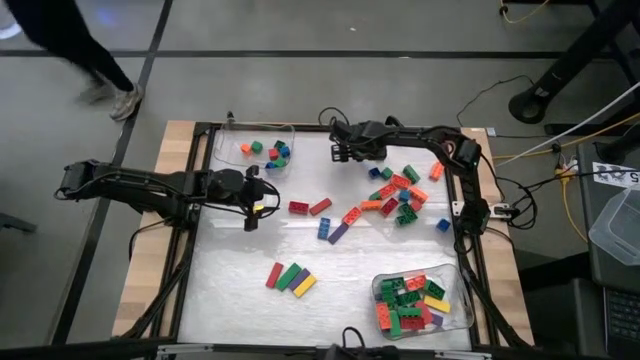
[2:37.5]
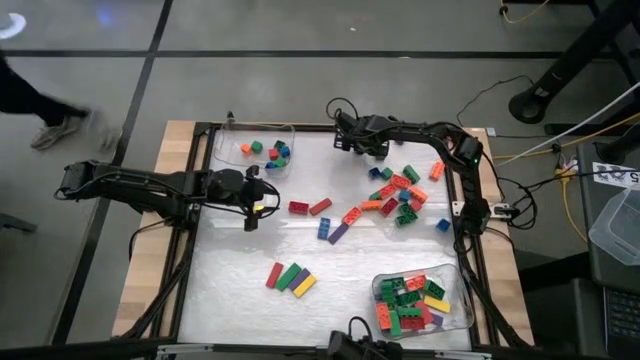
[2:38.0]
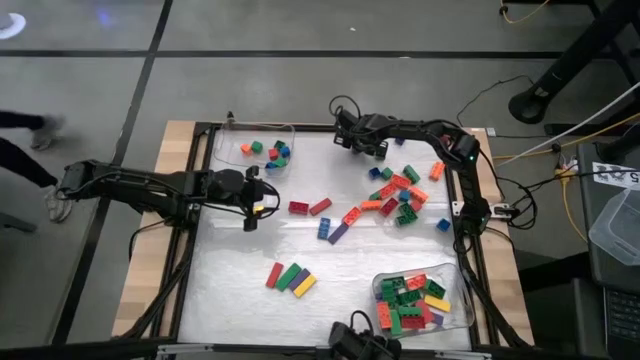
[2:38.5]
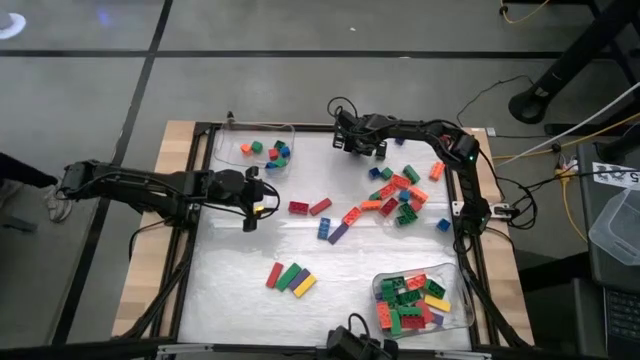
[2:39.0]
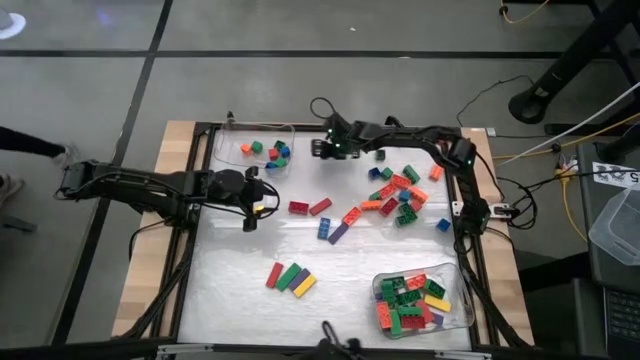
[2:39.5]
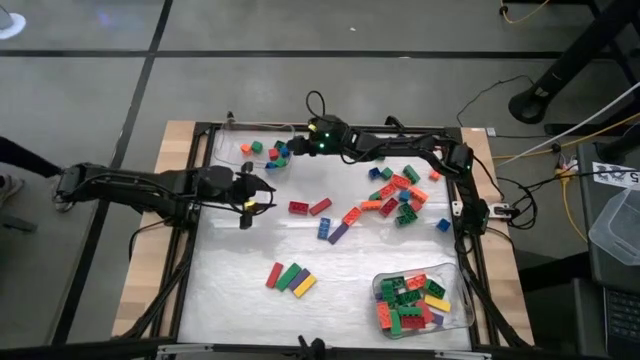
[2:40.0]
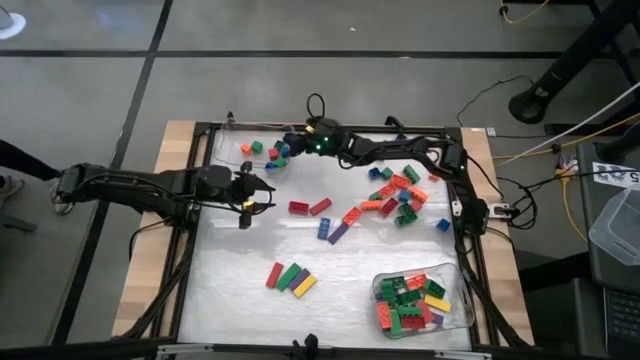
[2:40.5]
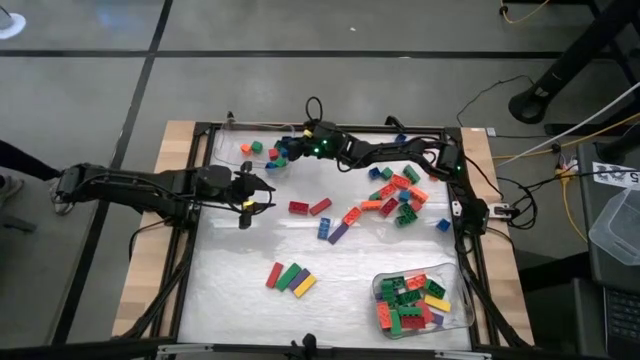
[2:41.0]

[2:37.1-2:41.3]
Task: Sort blocks by size
Put the square blue game piece into the top transparent bin

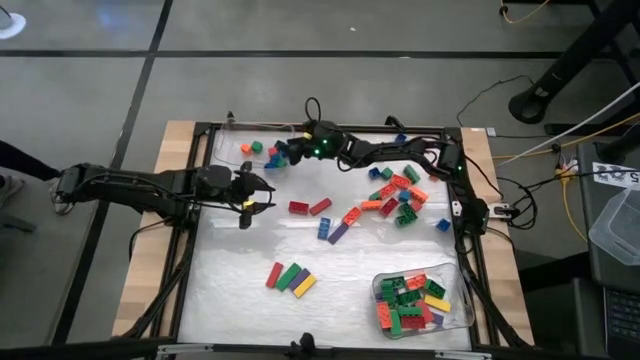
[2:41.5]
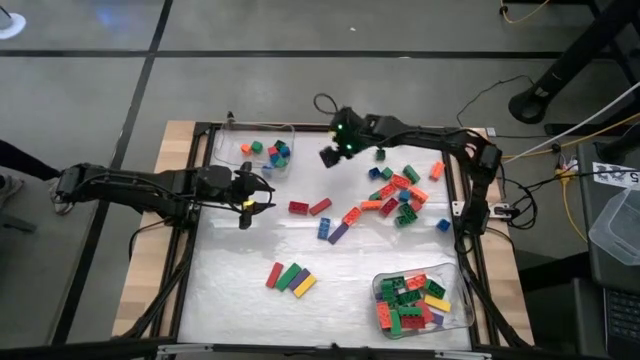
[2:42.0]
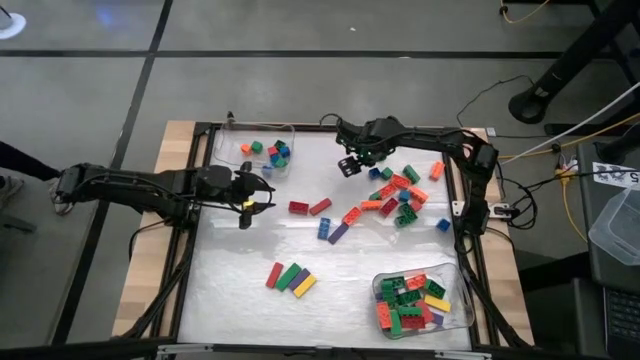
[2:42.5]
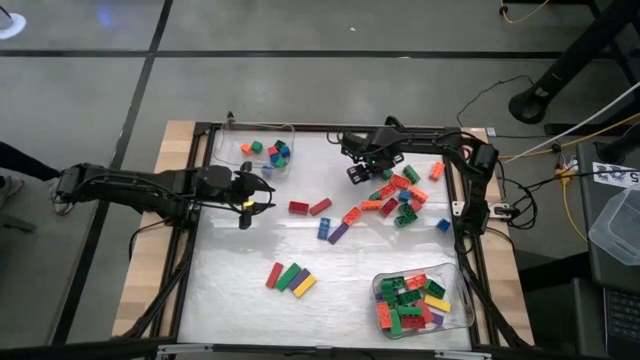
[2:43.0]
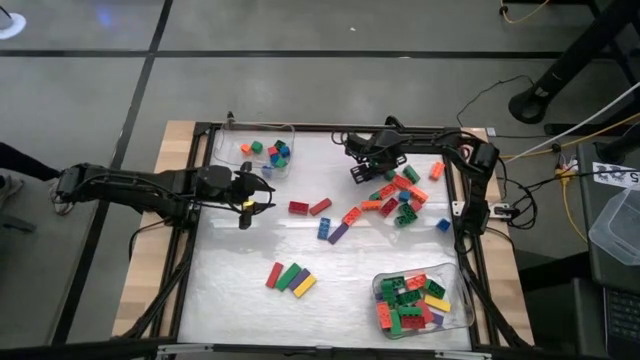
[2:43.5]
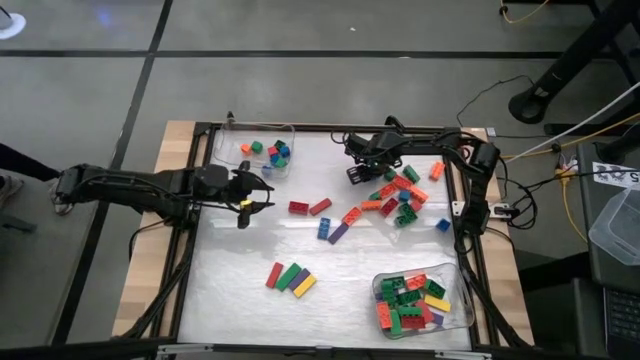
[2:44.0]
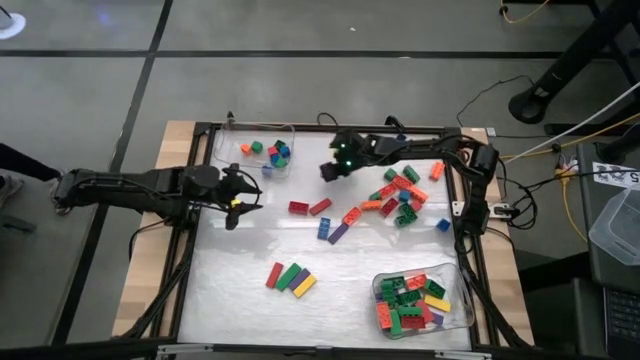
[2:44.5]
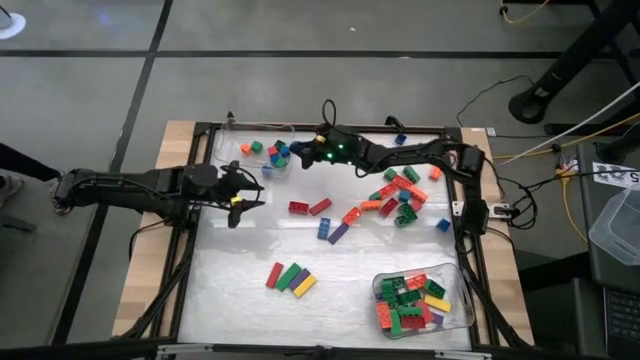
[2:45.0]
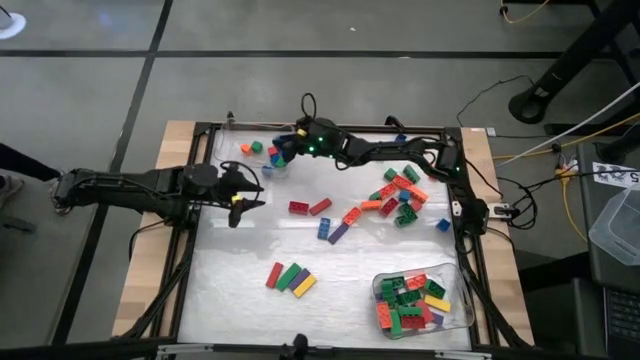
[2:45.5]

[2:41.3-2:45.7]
Put the square blue game piece into the top transparent bin

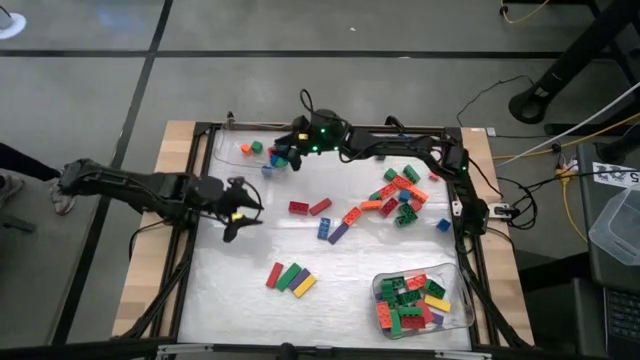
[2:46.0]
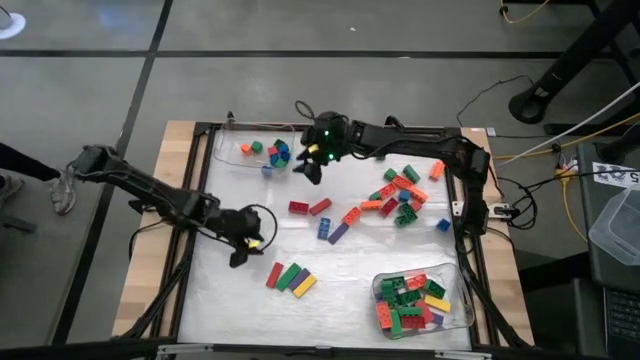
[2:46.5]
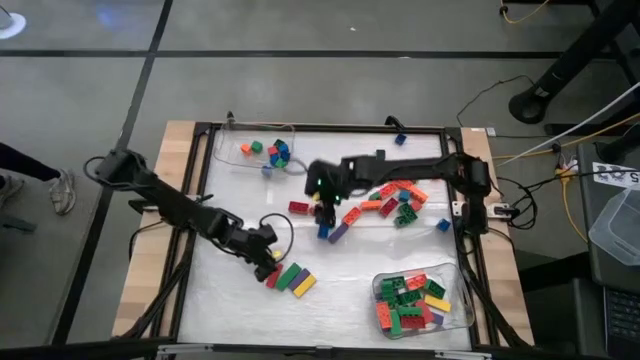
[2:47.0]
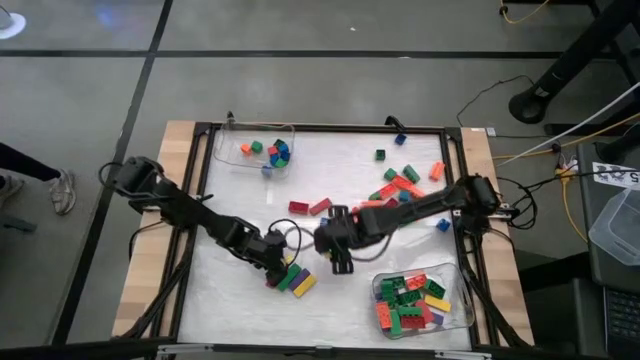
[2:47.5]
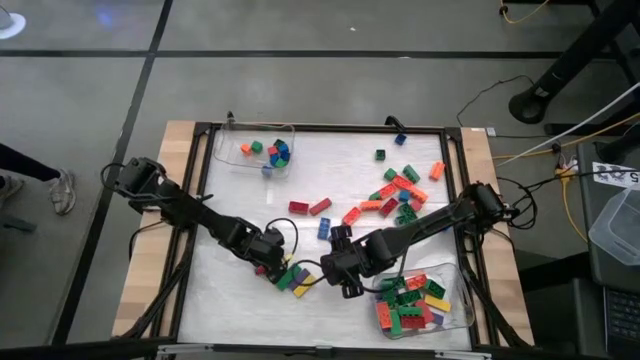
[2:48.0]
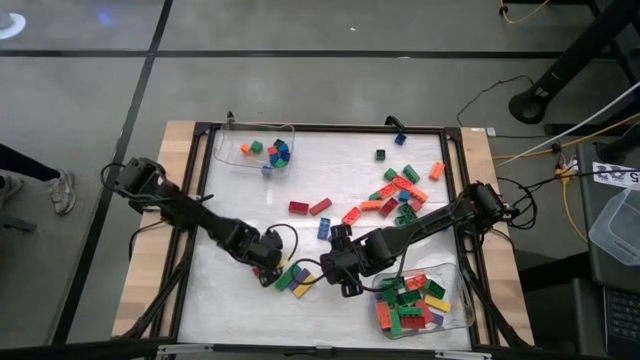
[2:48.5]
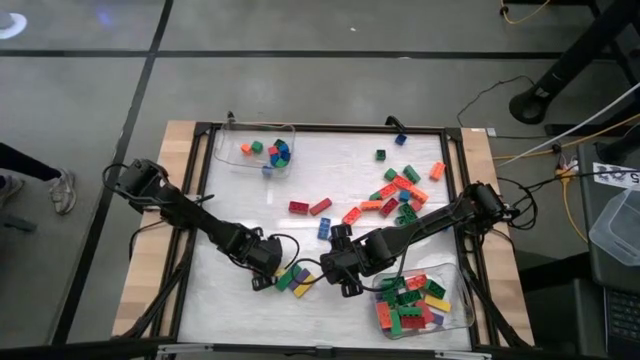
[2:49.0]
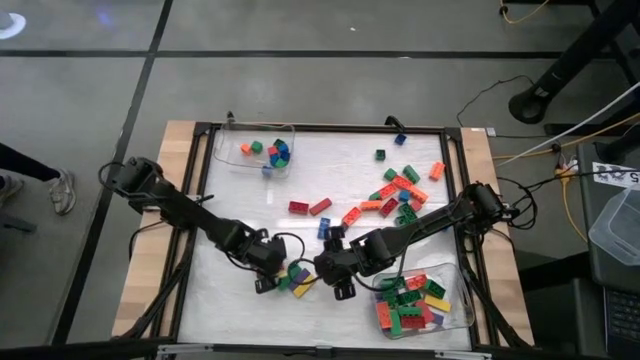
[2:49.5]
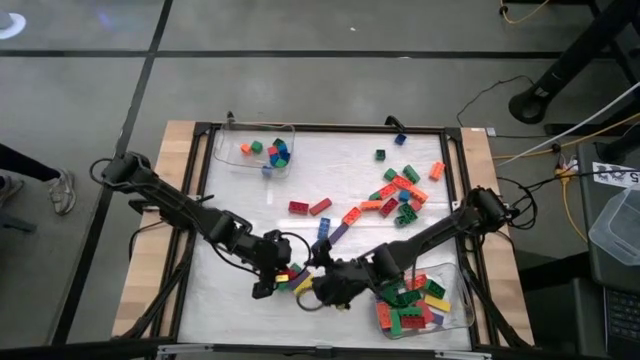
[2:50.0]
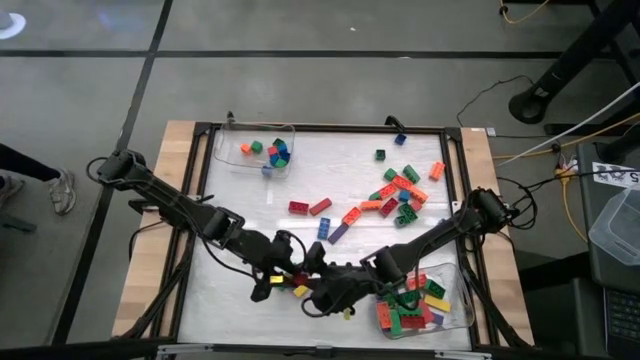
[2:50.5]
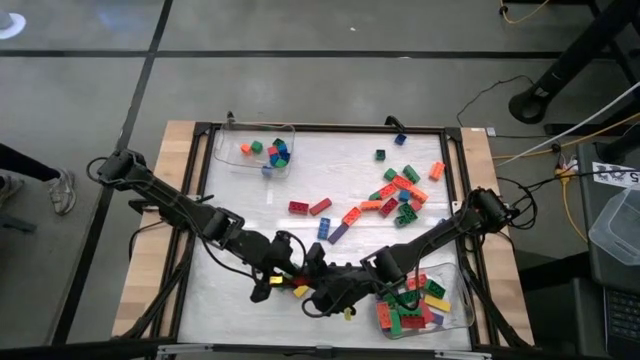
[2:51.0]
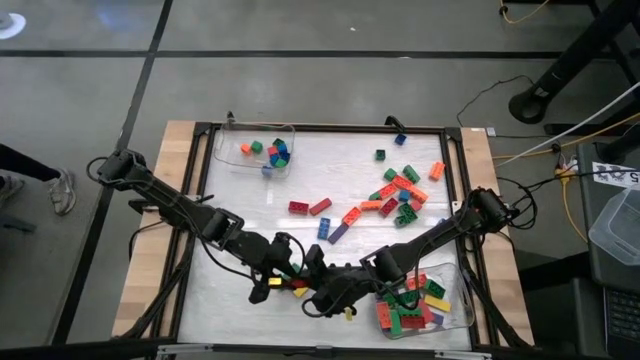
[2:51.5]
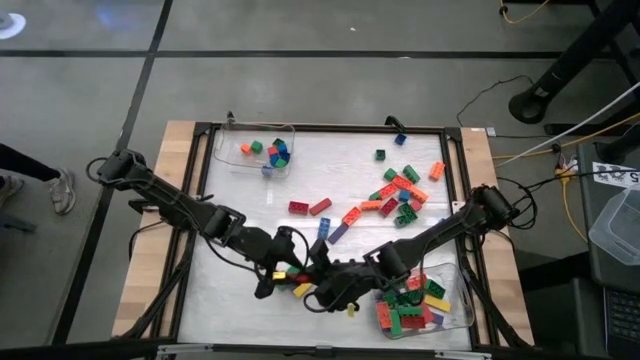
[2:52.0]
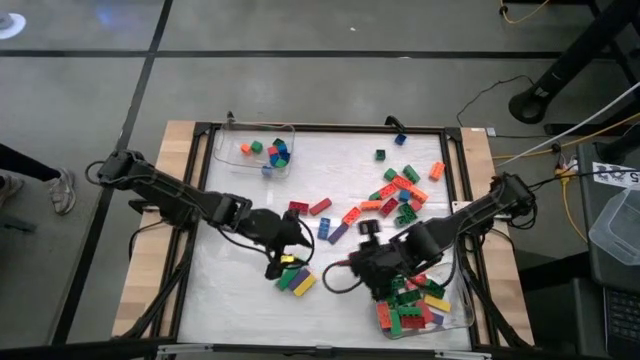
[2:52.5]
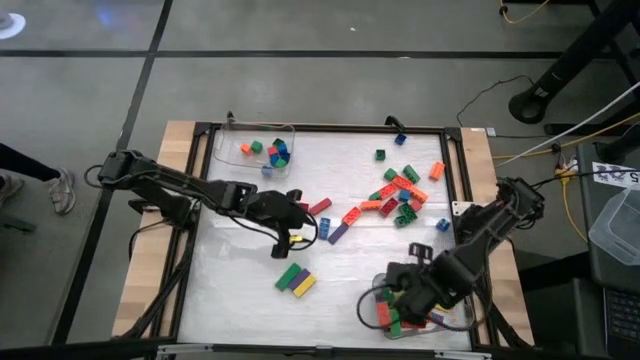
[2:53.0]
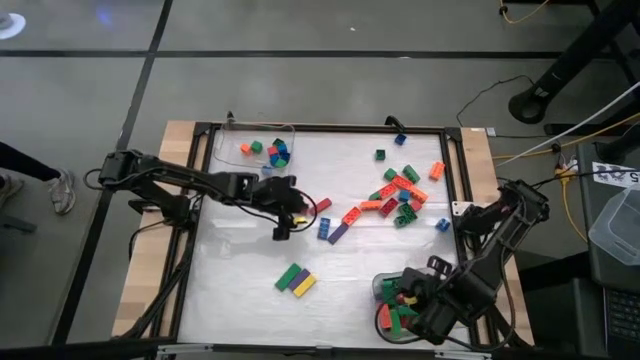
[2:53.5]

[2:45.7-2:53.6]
Put the rectangular red block into the bottom transparent bin

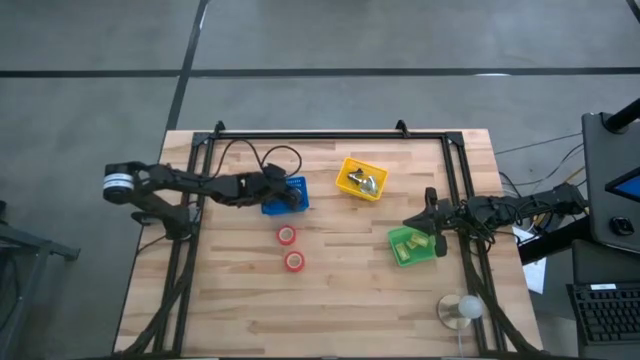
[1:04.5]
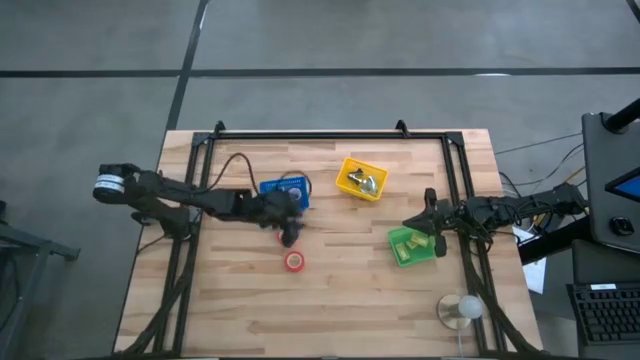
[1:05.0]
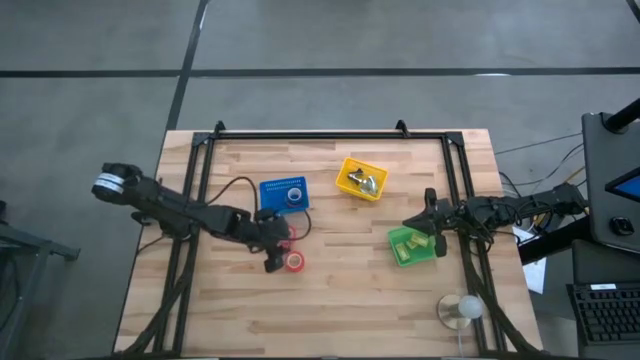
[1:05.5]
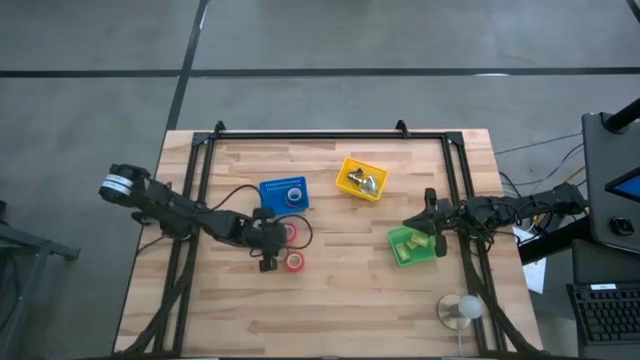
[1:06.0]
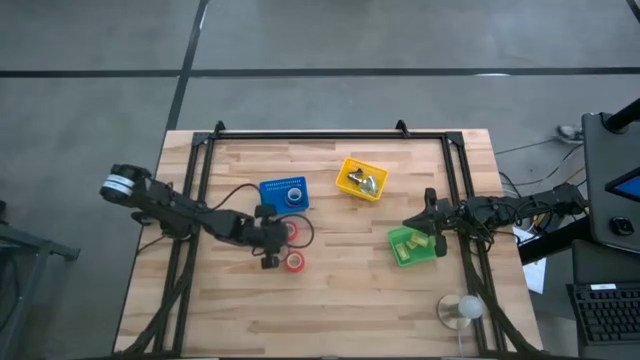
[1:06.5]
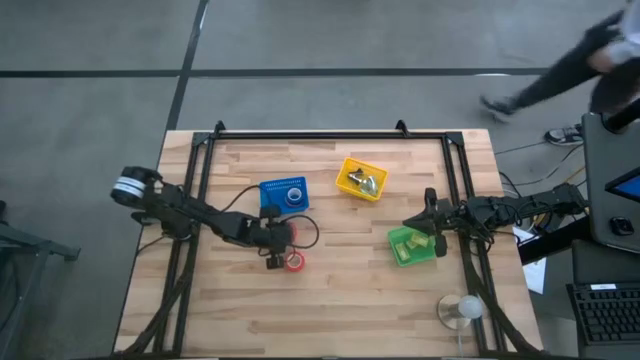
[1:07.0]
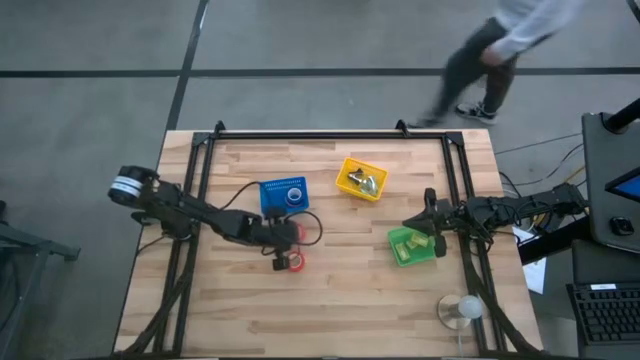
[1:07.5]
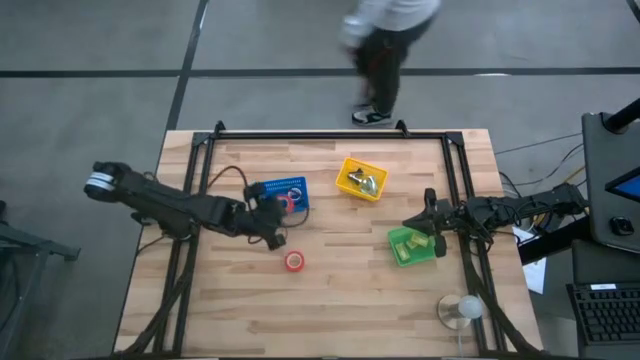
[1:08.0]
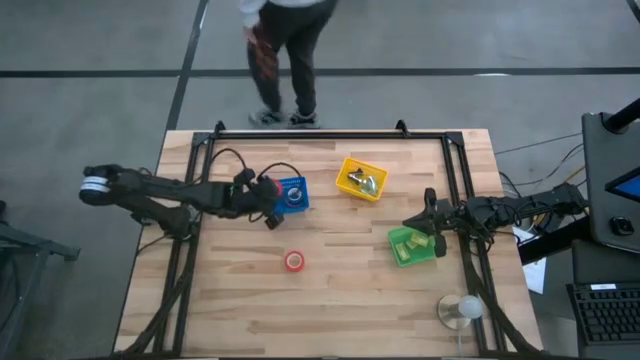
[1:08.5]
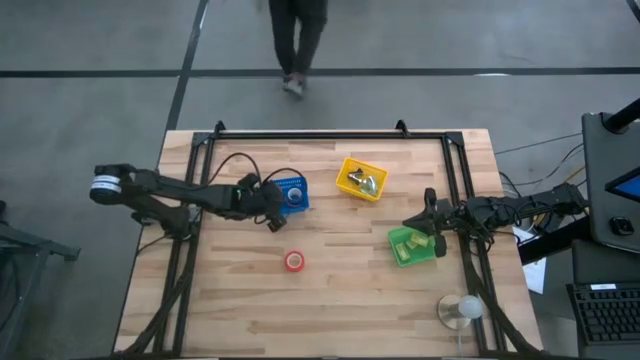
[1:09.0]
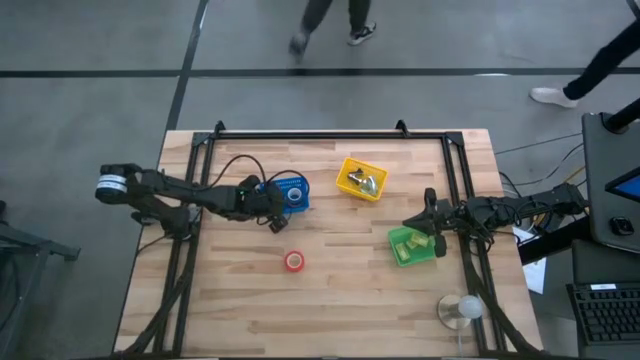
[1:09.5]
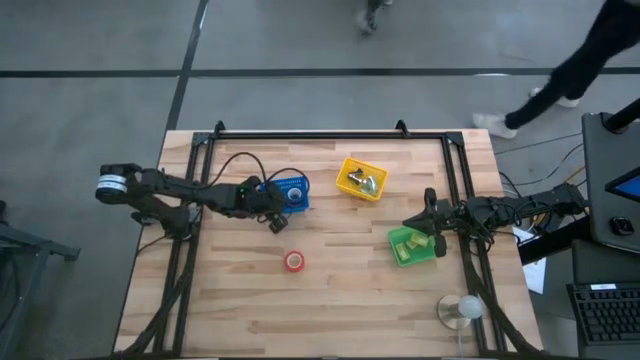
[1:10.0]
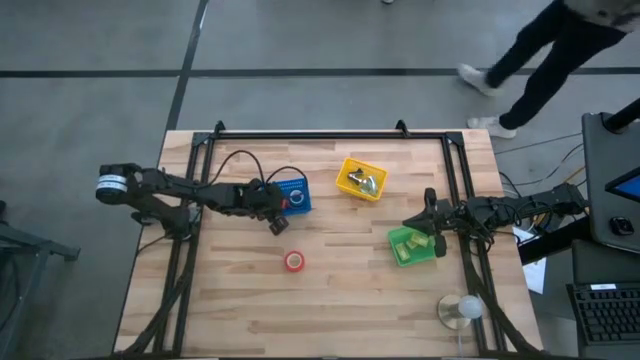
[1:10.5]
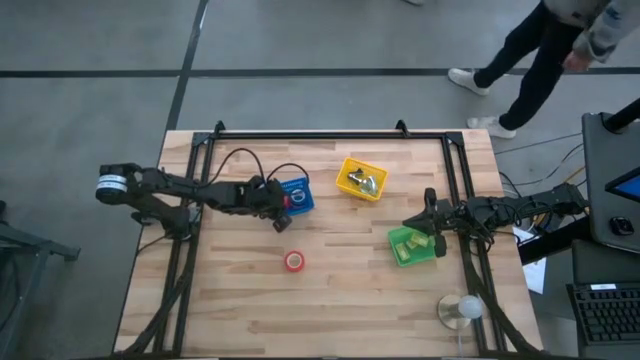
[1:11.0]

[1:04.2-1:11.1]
Task: Pick and place Stapler, Stapler remover, tape
Put the top red tape into the blue bin
